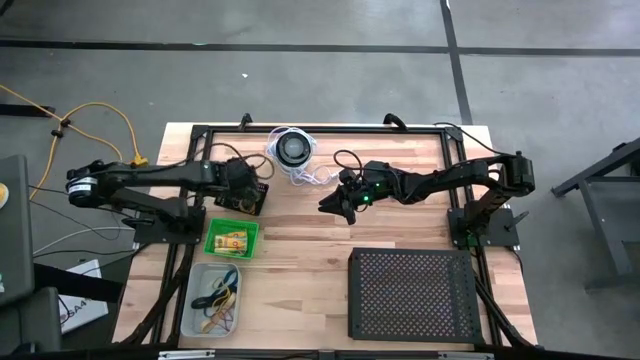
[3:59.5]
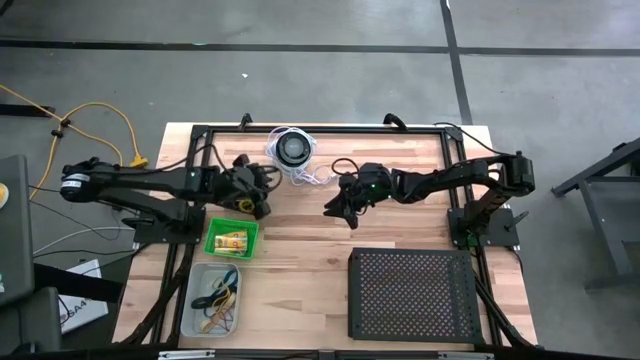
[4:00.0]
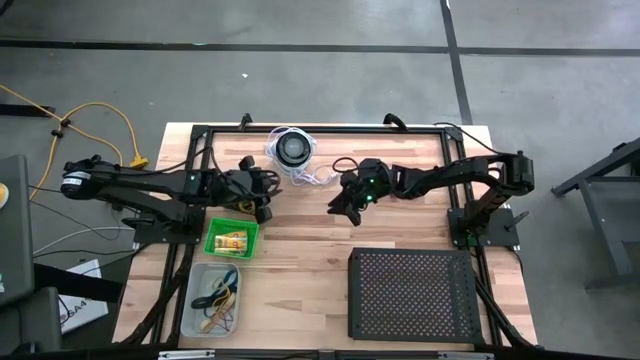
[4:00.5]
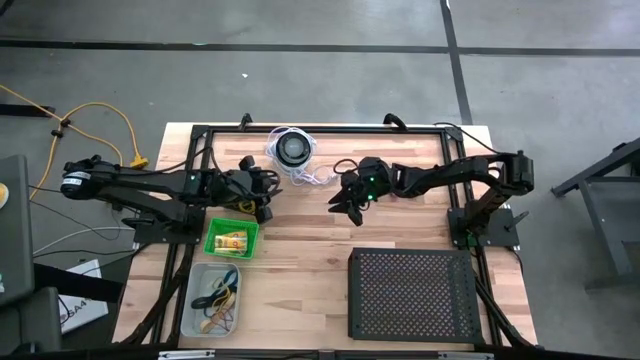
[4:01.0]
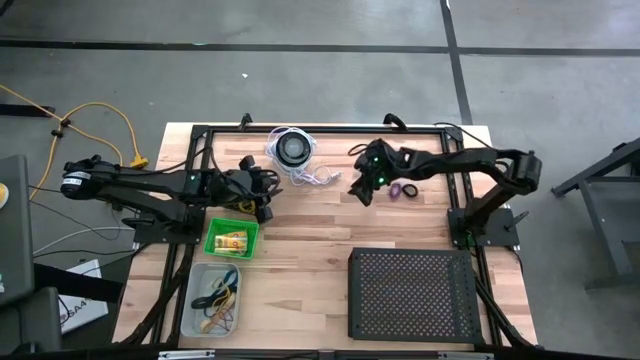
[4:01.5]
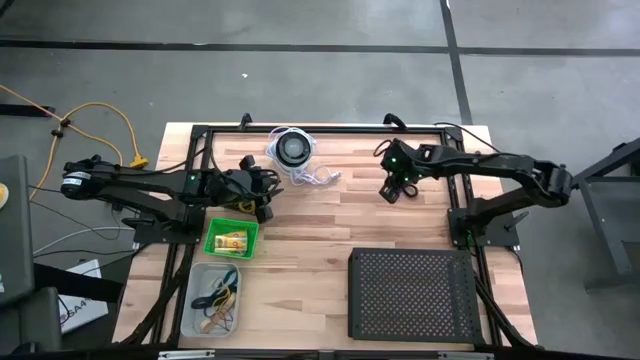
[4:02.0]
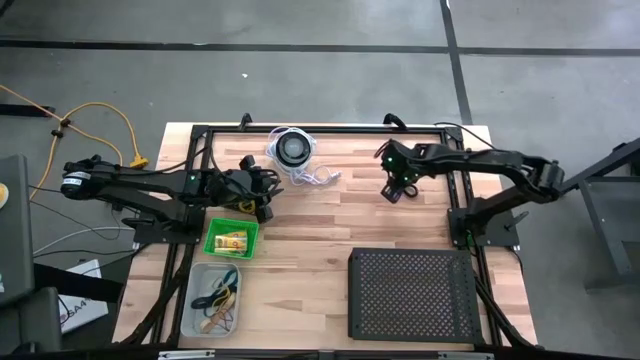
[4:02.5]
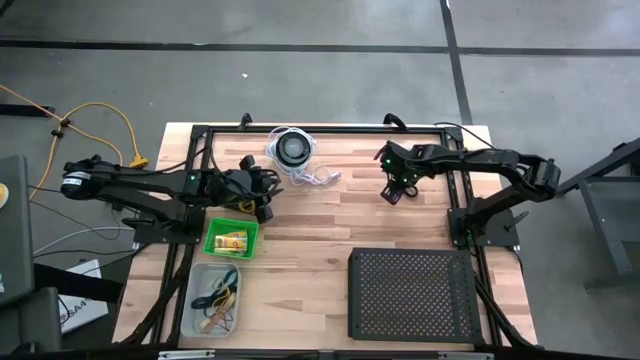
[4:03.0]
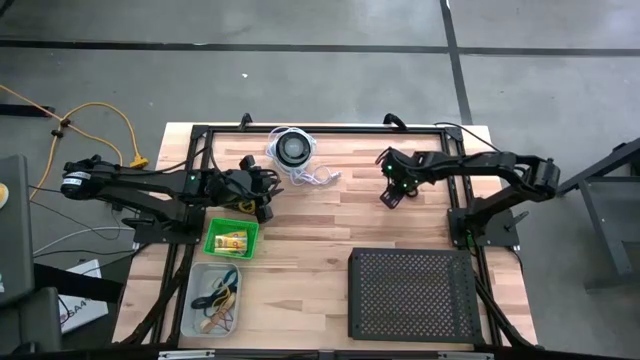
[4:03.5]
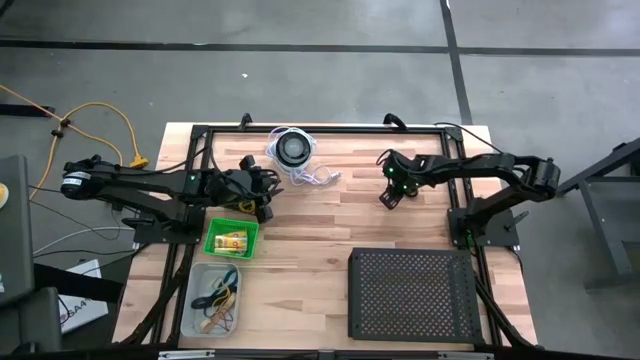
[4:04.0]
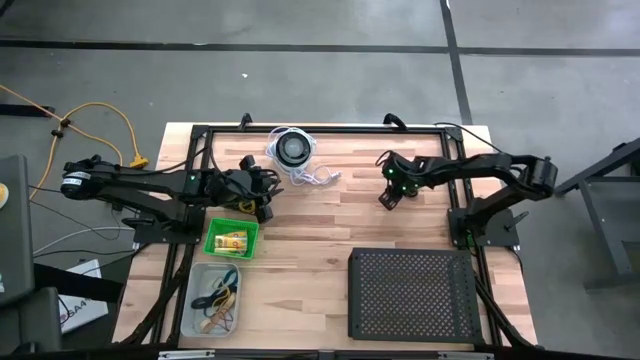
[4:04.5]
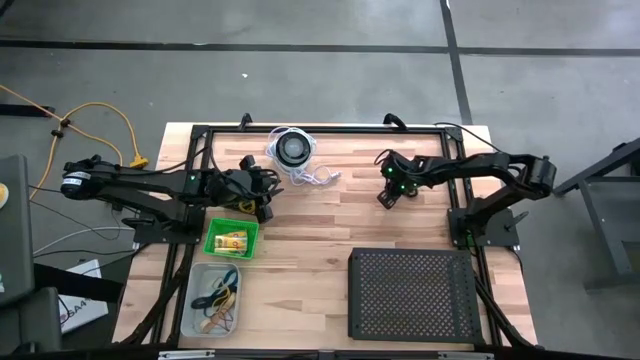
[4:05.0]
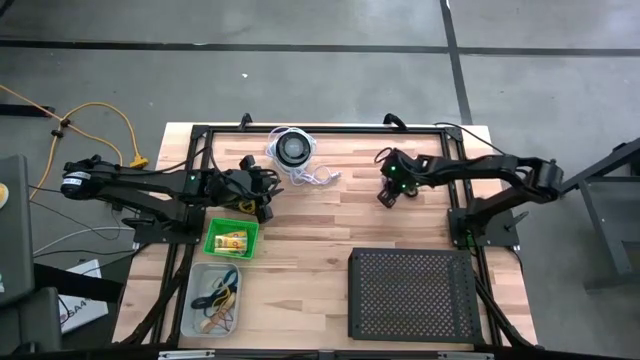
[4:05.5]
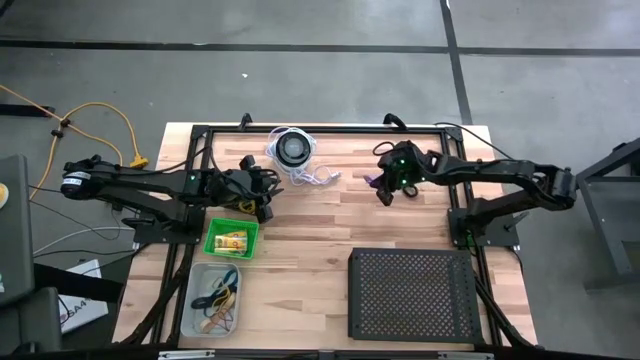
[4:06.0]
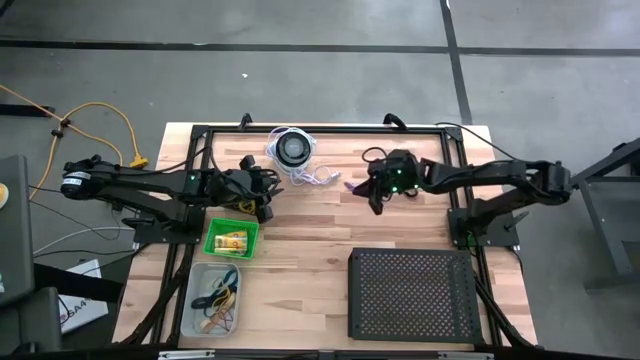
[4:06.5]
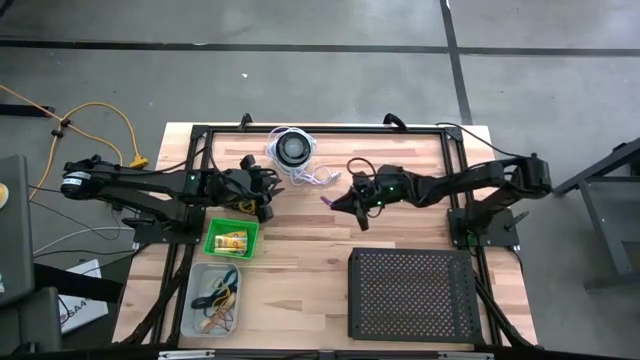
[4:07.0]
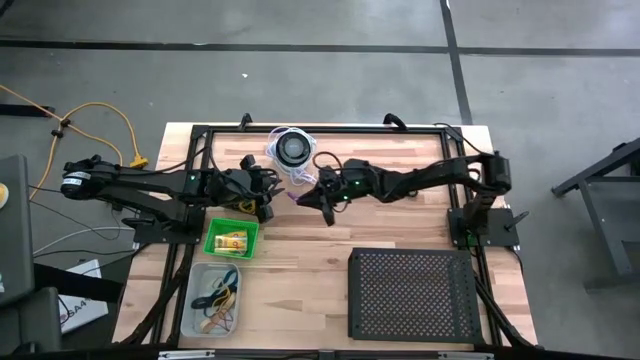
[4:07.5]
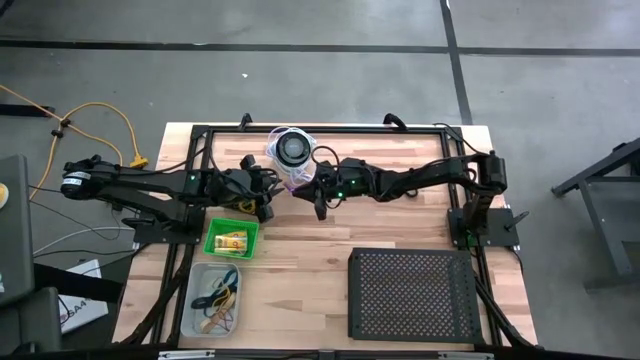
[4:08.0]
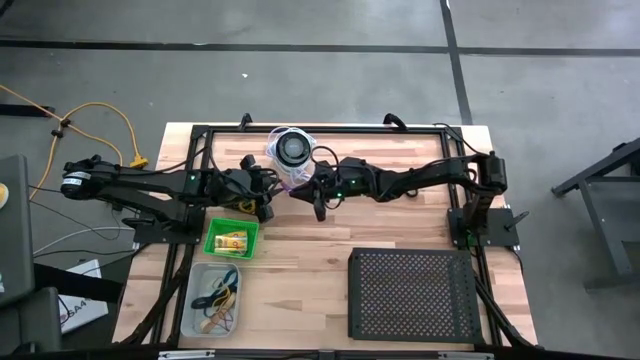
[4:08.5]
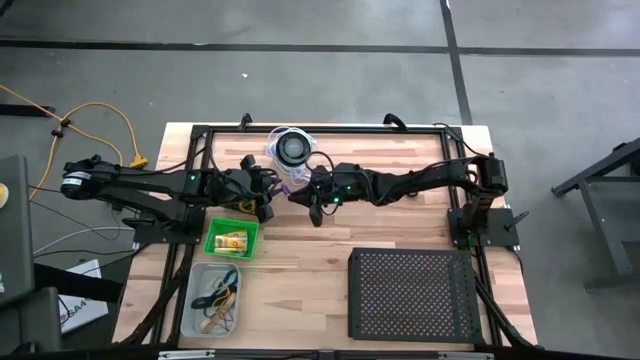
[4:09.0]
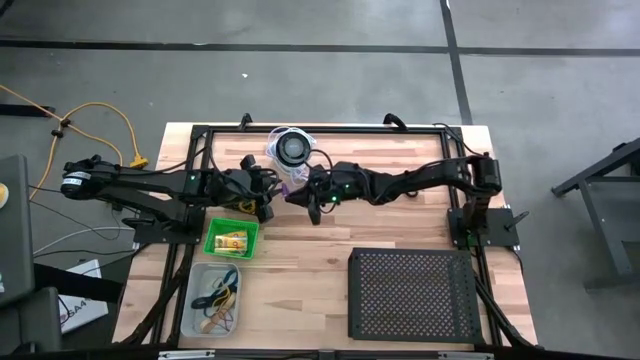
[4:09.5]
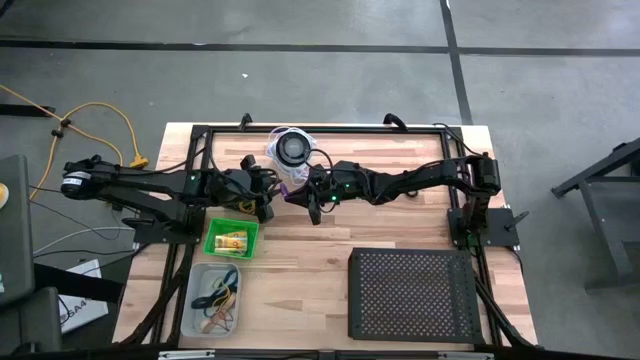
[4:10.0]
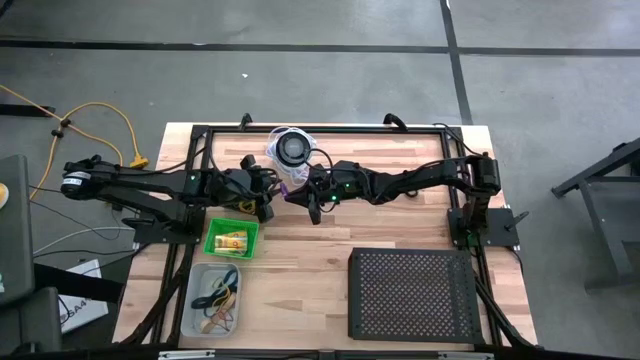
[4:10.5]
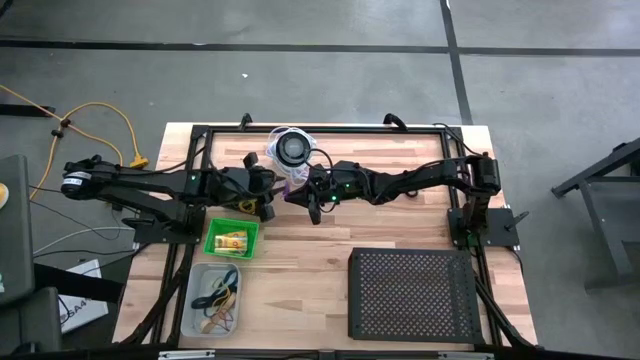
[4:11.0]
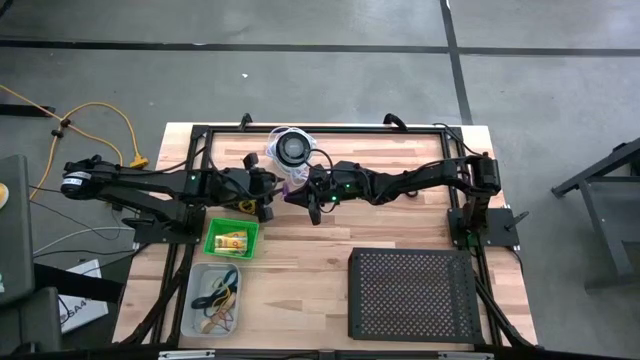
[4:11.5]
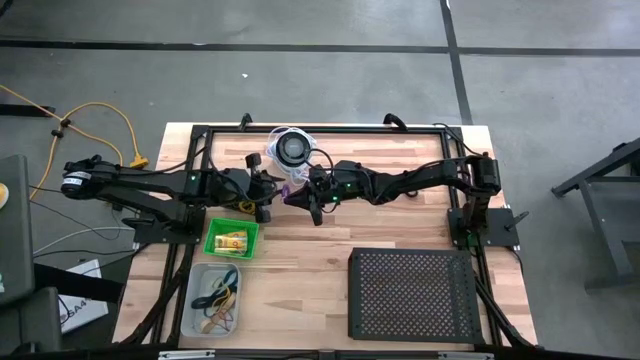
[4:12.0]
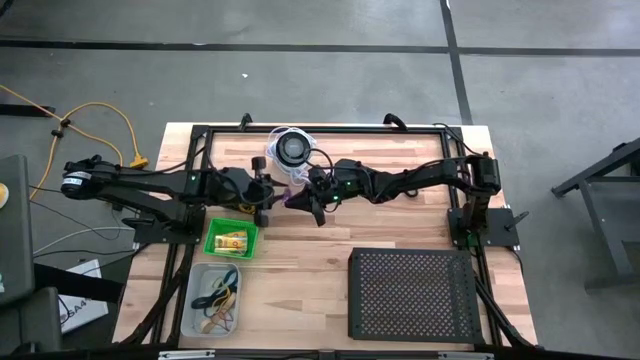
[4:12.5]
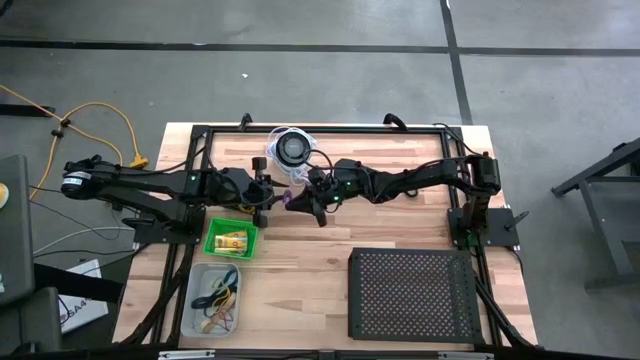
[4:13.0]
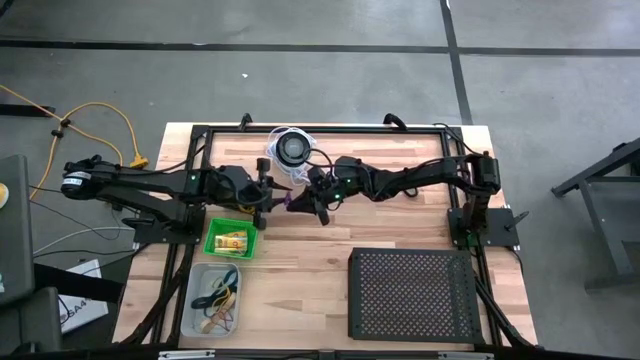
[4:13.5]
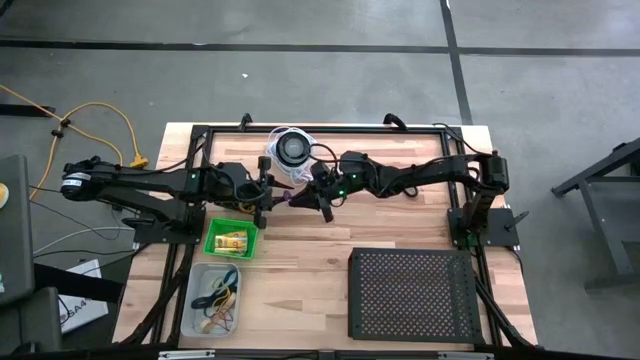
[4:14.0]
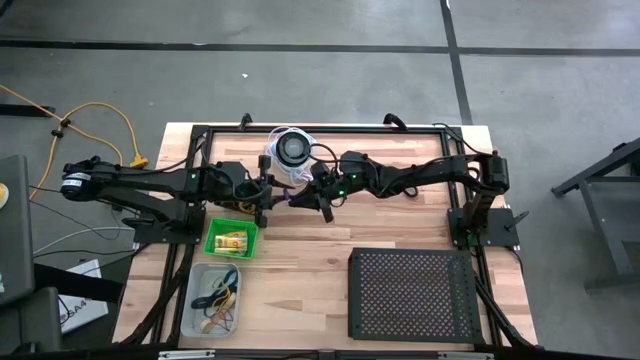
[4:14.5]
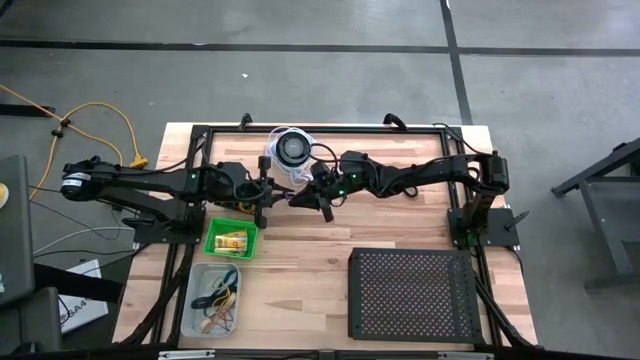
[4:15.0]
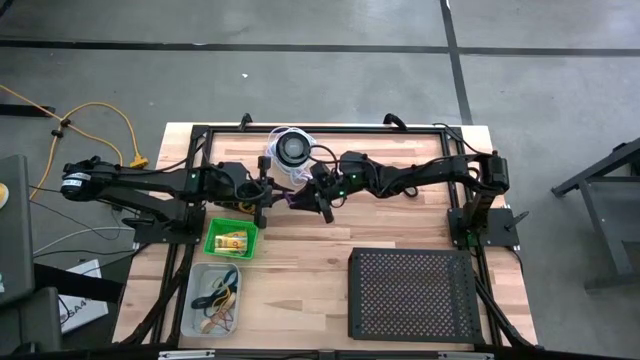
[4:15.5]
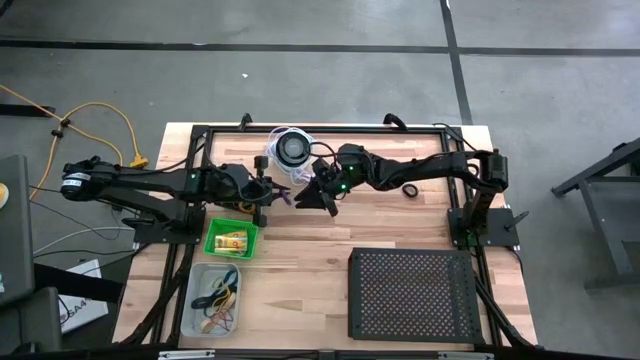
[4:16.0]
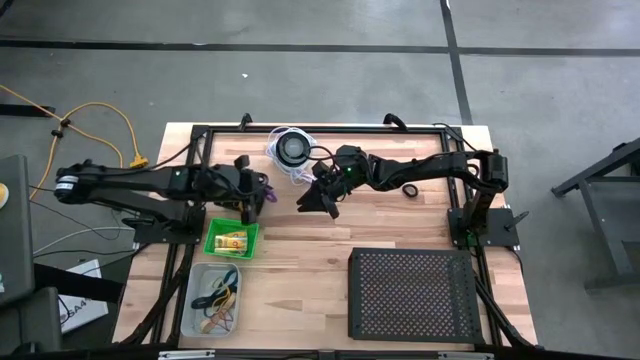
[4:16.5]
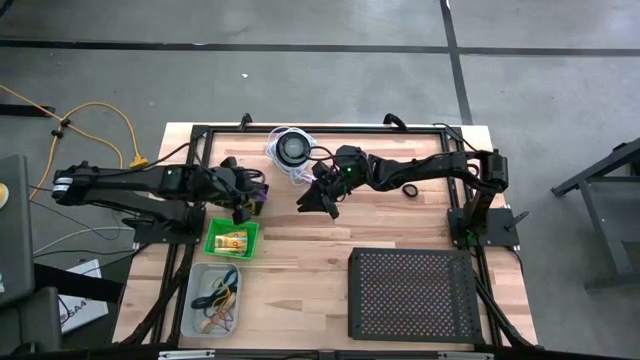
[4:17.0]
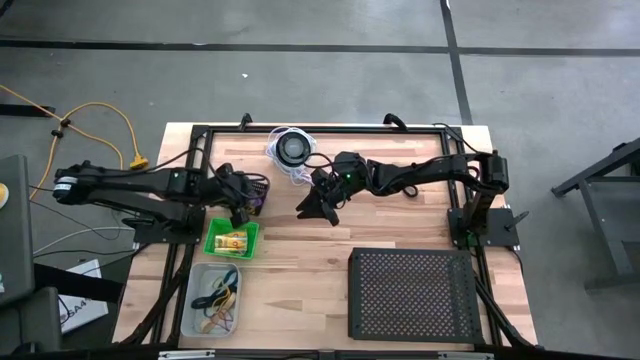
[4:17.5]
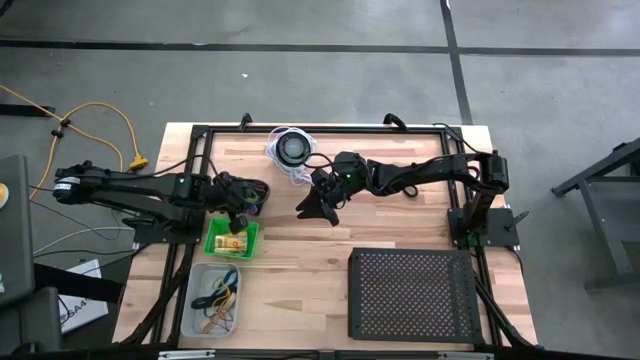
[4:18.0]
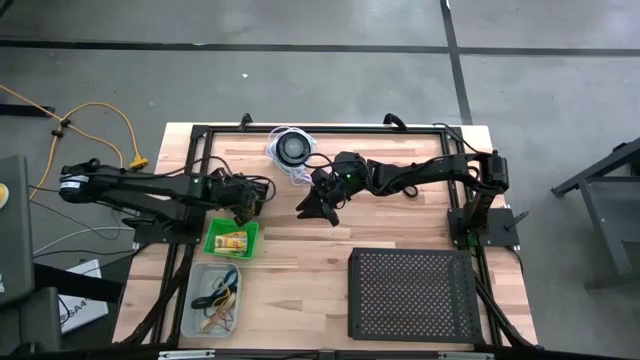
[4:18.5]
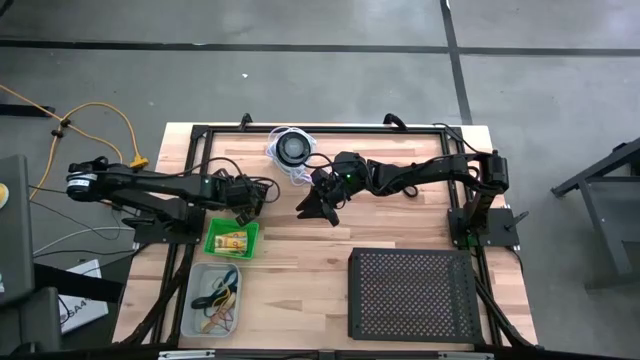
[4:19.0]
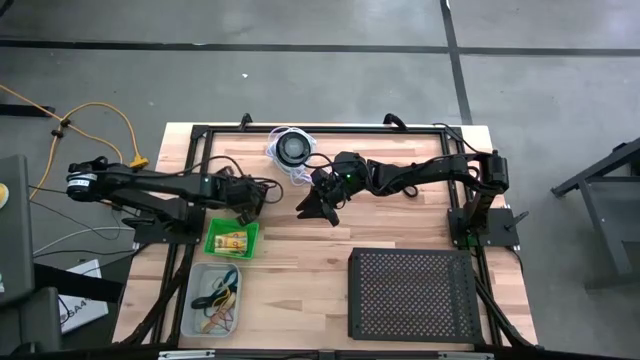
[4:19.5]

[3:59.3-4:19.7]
Task: Pick & Place Office Desk Supplies
Put the purple coil keychain into the black bin

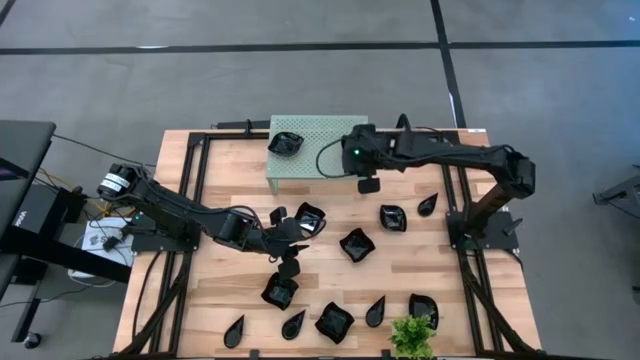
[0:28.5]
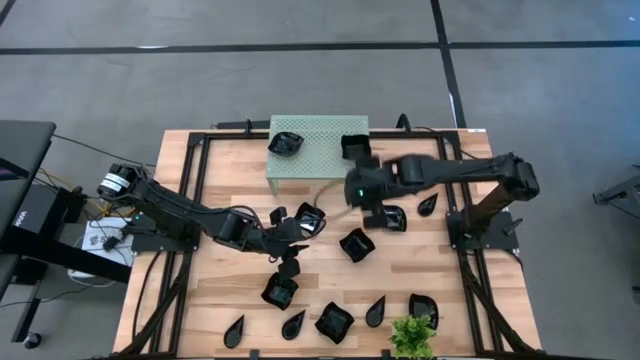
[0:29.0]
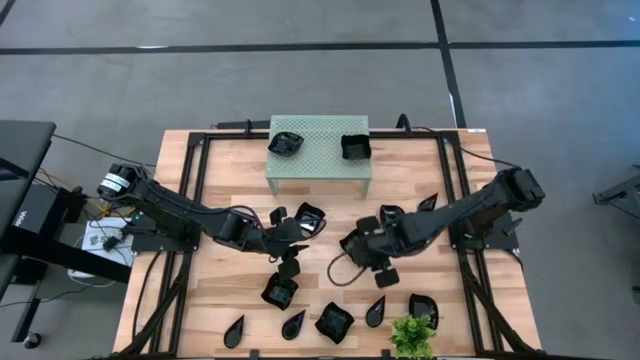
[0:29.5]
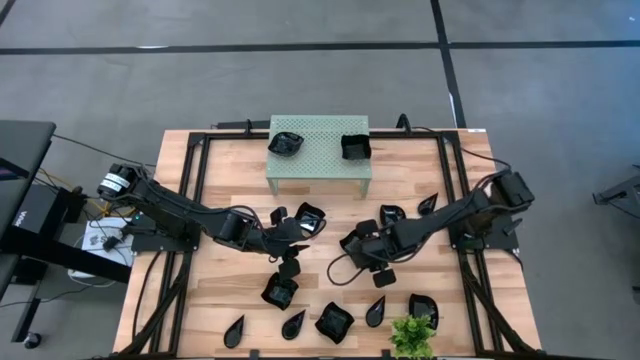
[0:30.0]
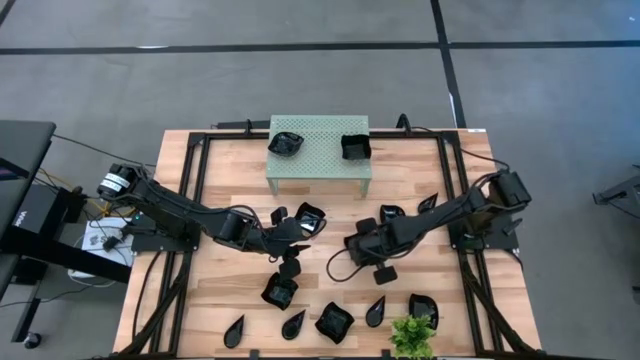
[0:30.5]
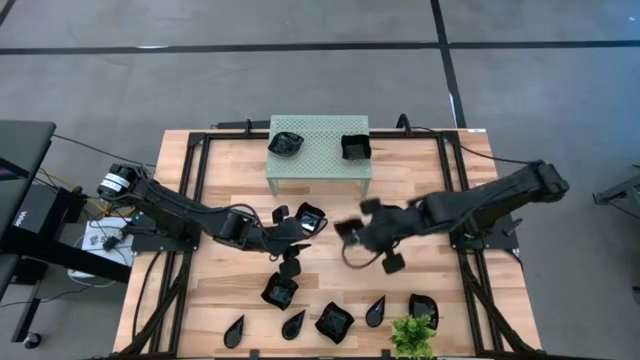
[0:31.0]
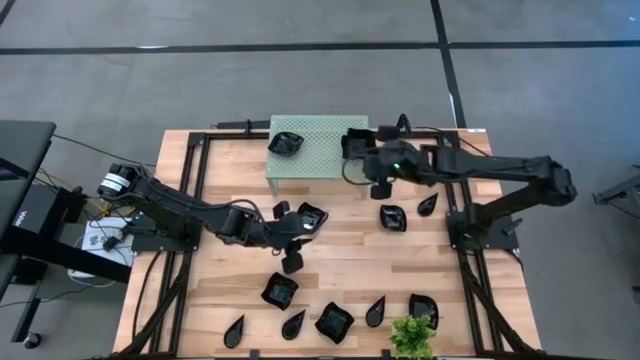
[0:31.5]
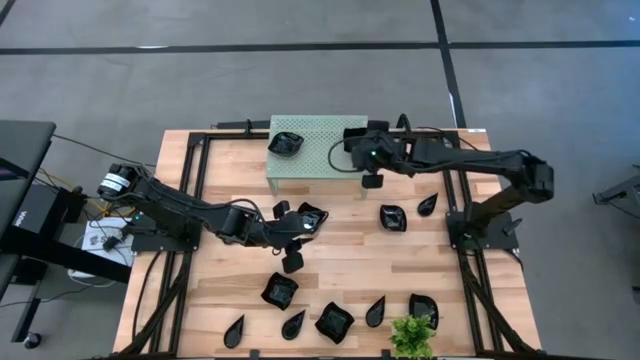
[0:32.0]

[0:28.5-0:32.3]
Task: Pick & Place Mini shaped plates
Stack the distorted square plate on top of the other distorted square plate on the shelf
